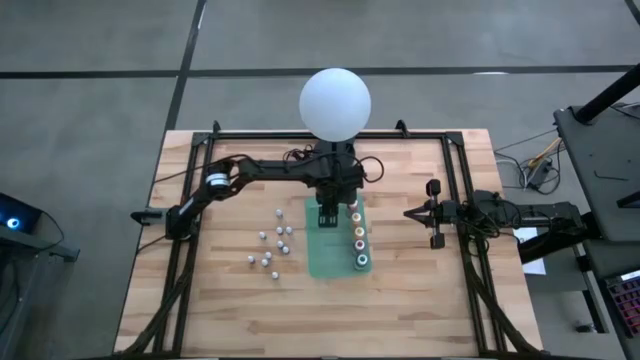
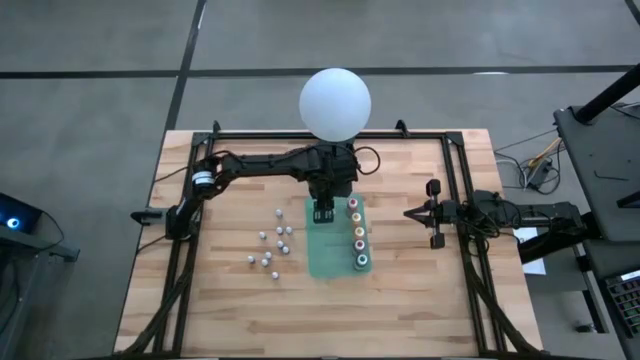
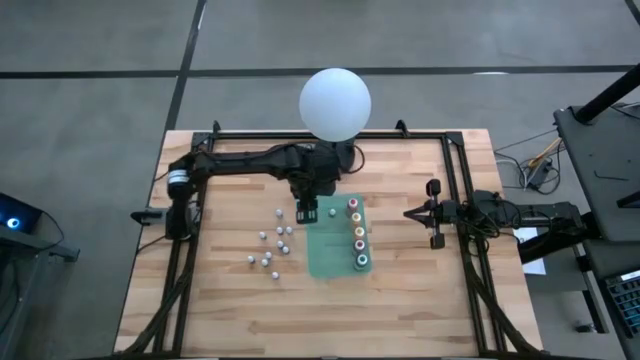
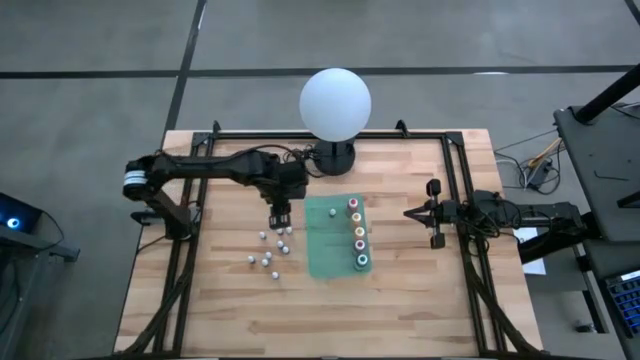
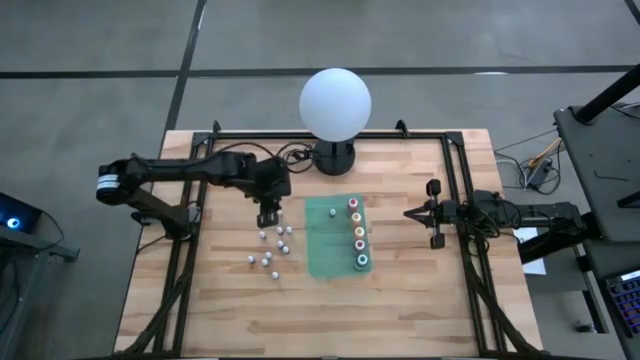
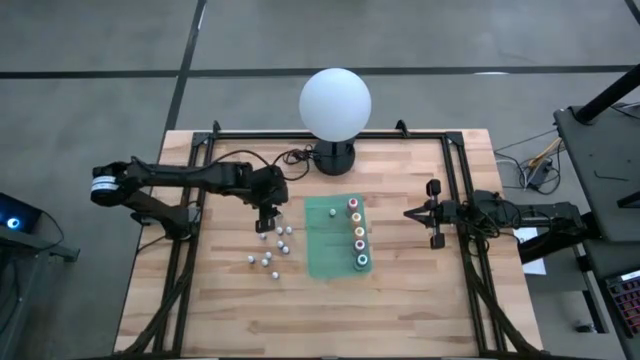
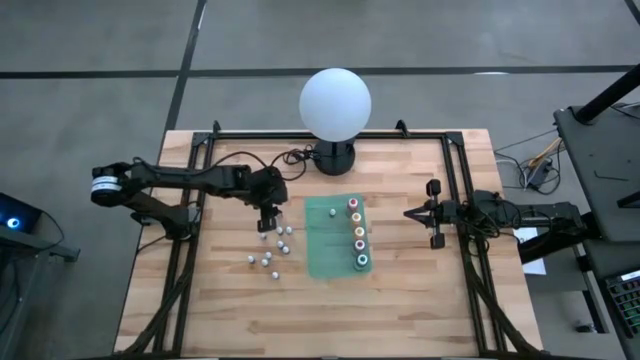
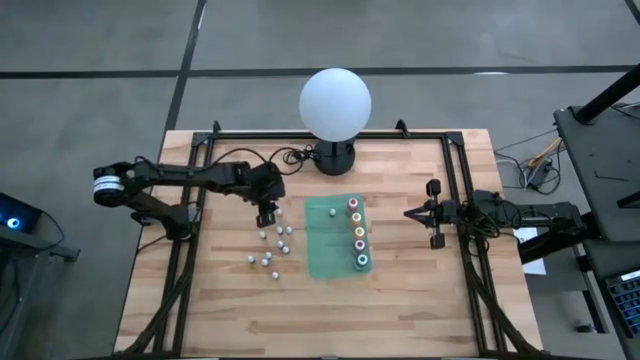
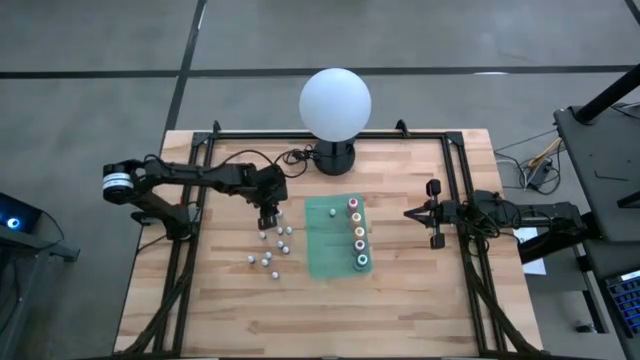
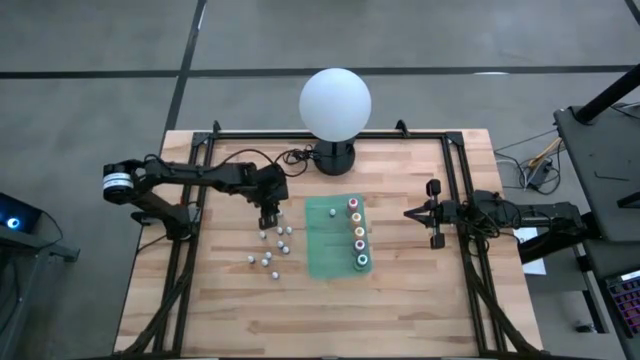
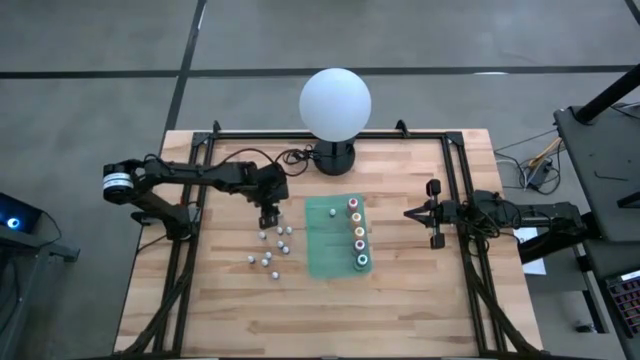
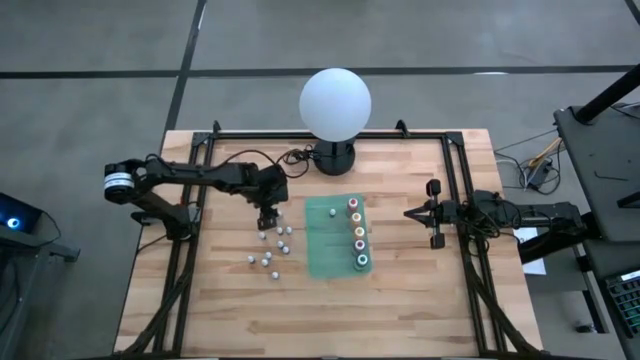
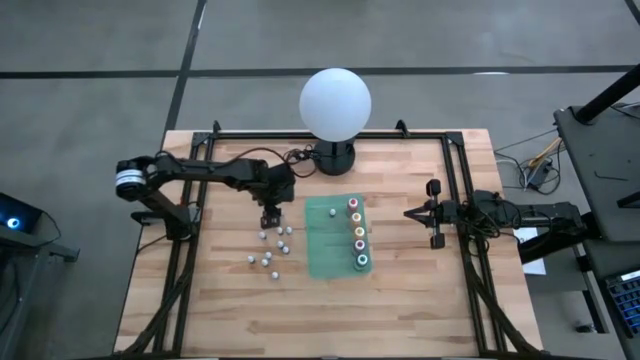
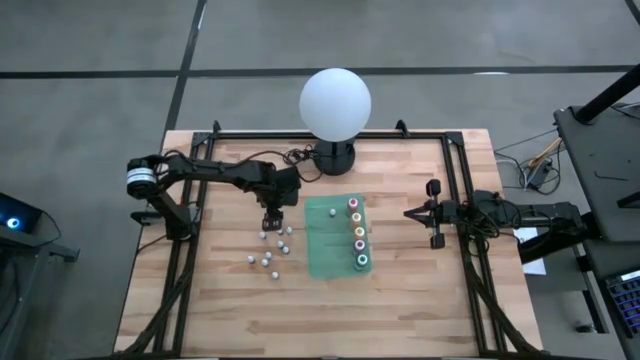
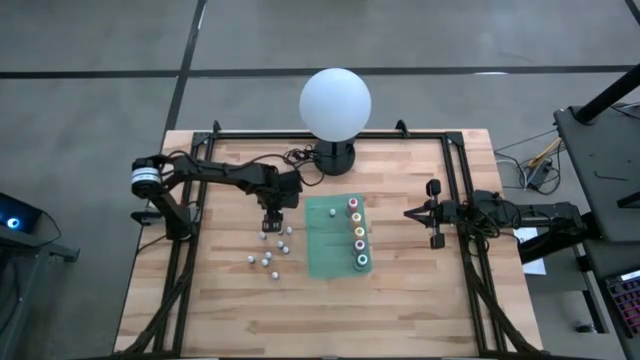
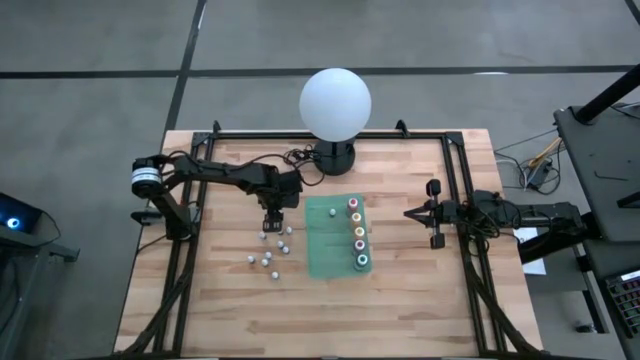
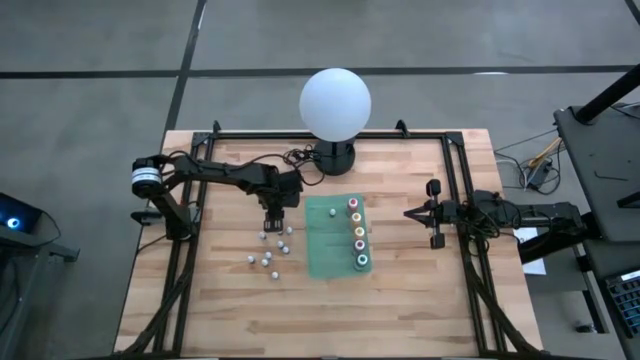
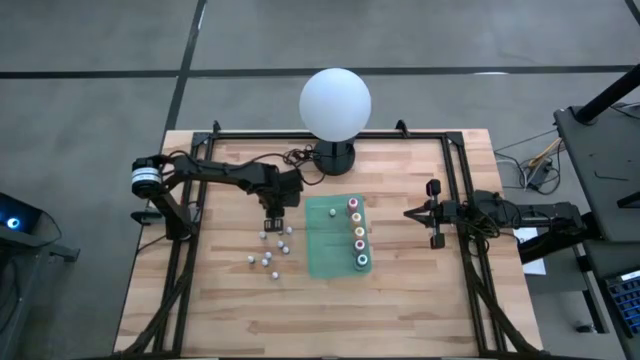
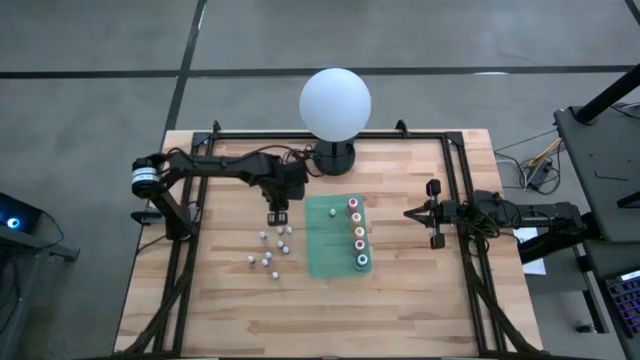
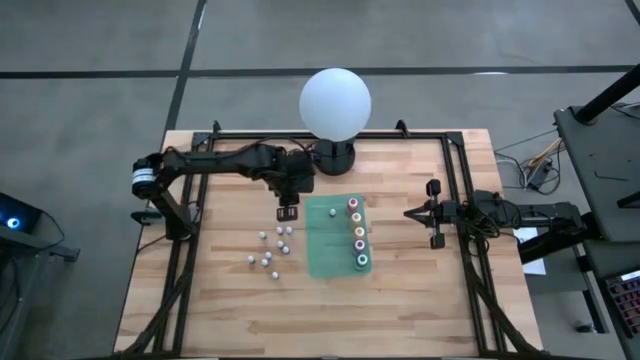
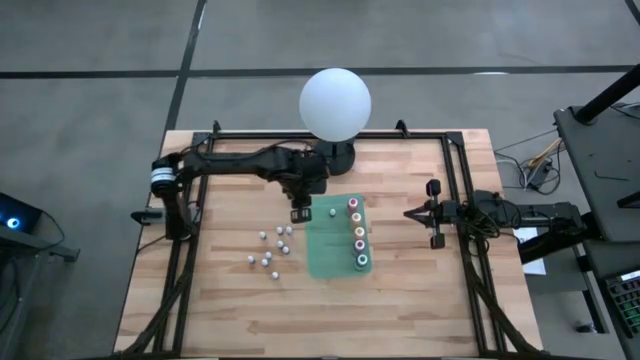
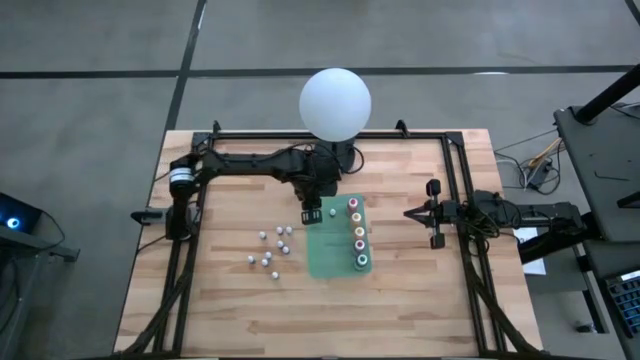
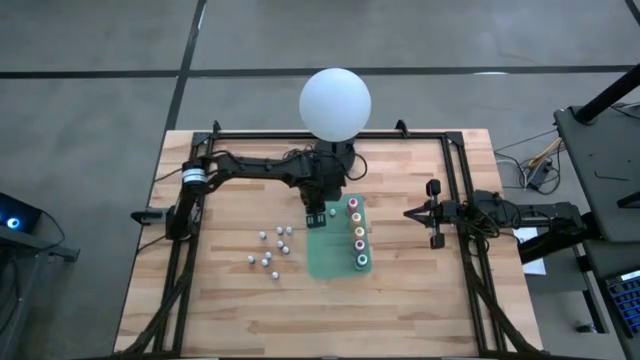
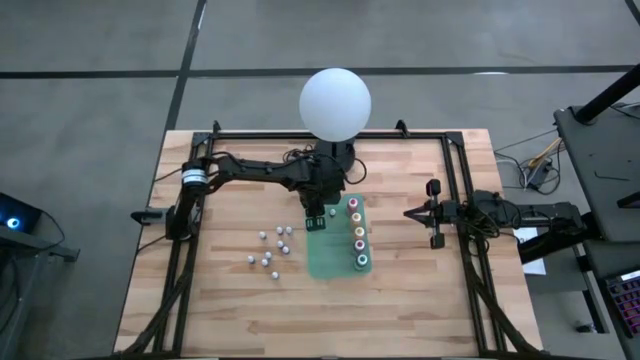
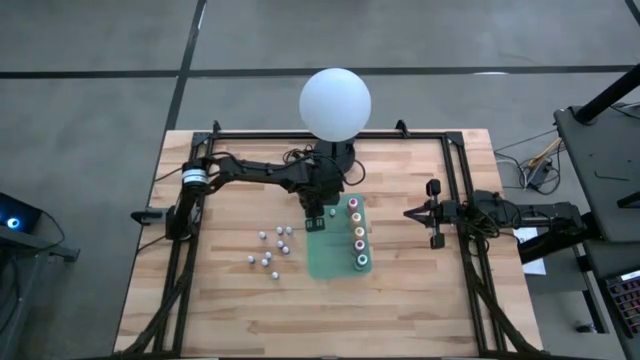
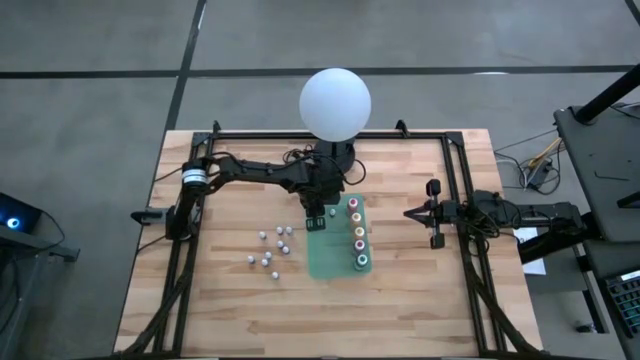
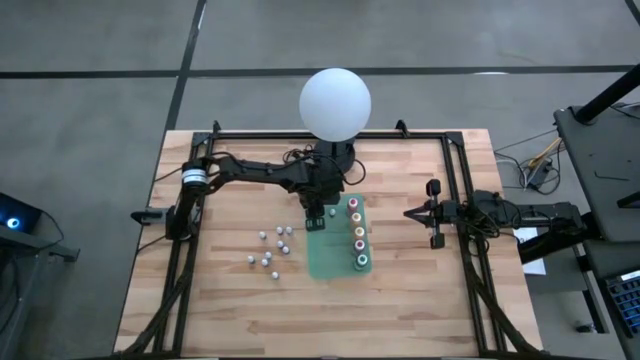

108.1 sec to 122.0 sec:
Task: Pick & Place food coloring
Put the top small red food coloring bottle into the green bin

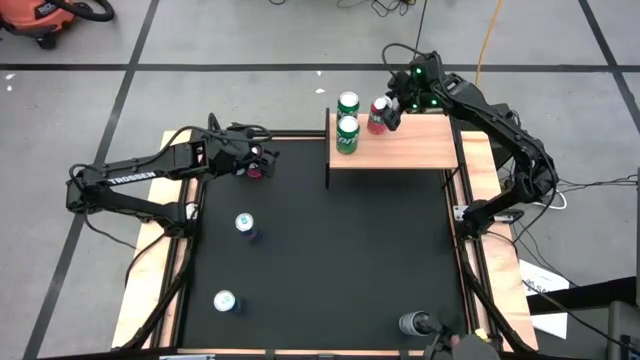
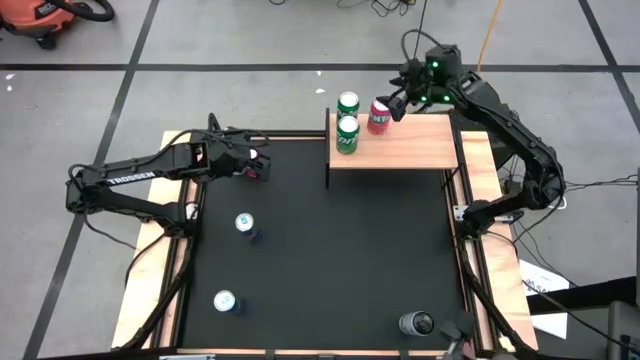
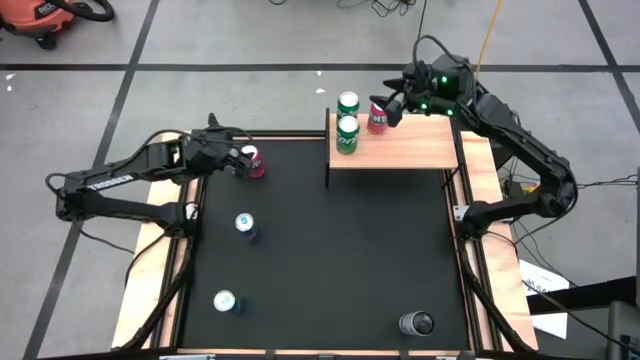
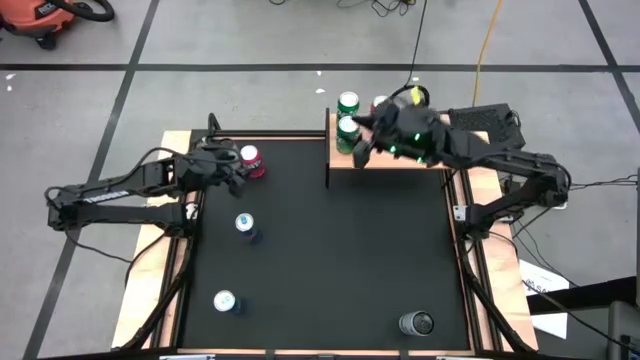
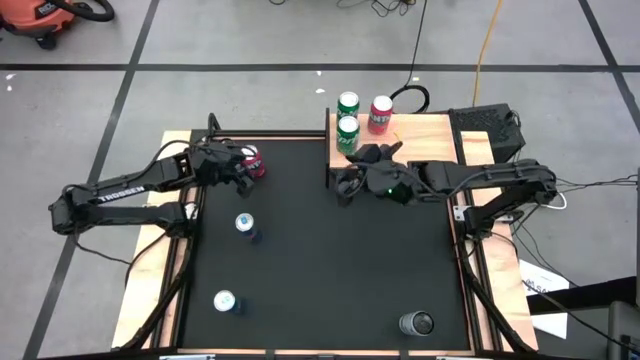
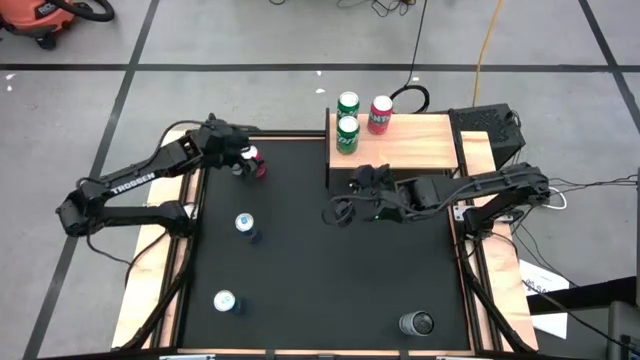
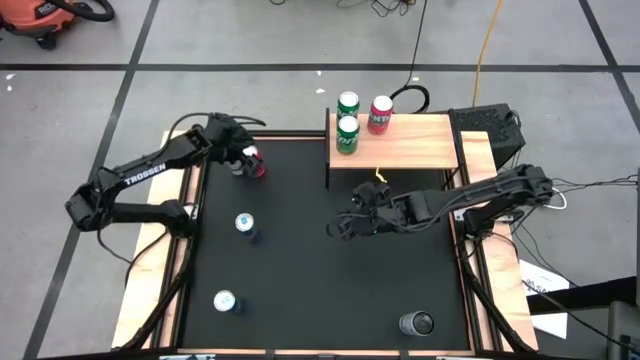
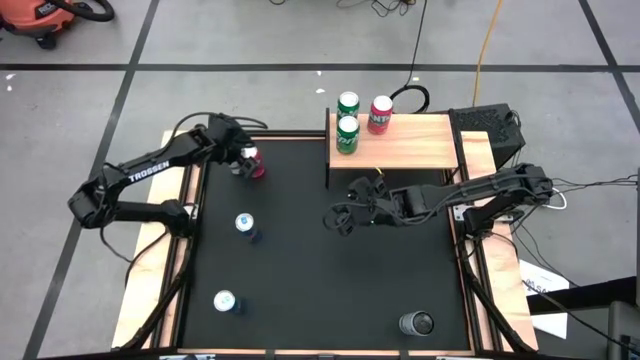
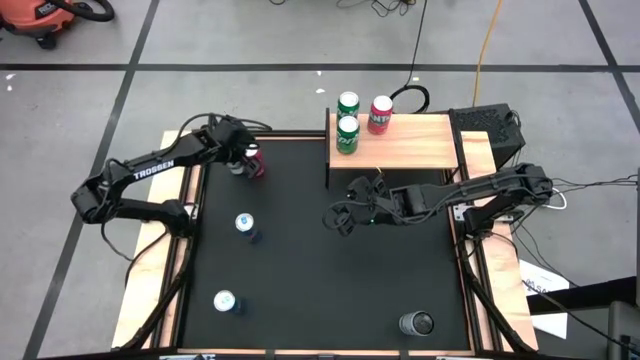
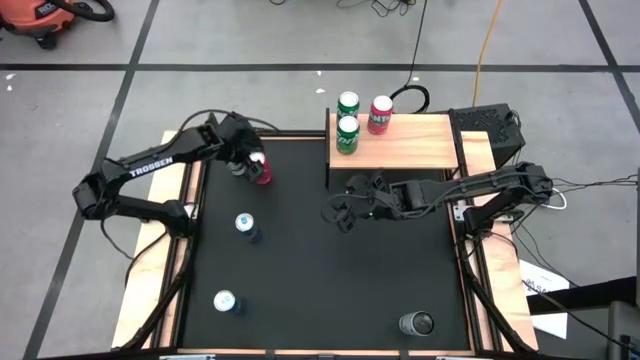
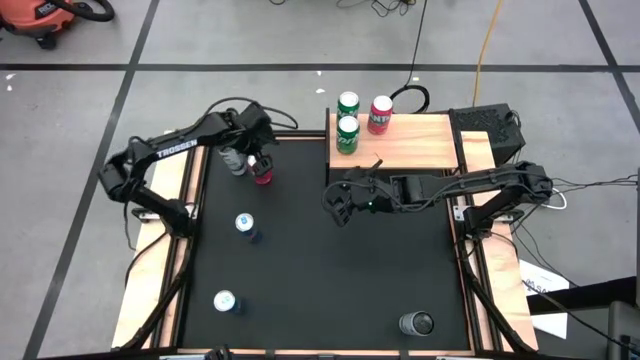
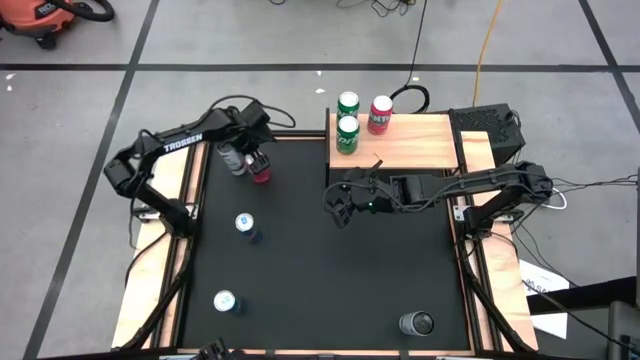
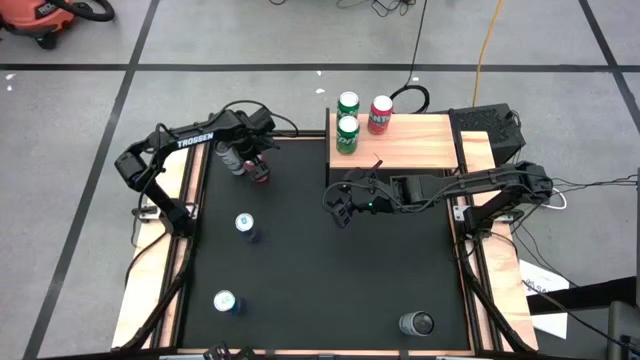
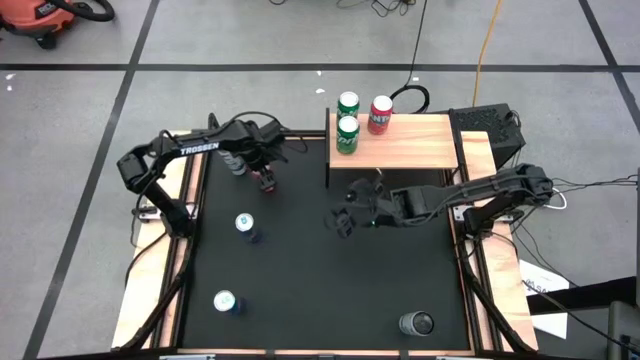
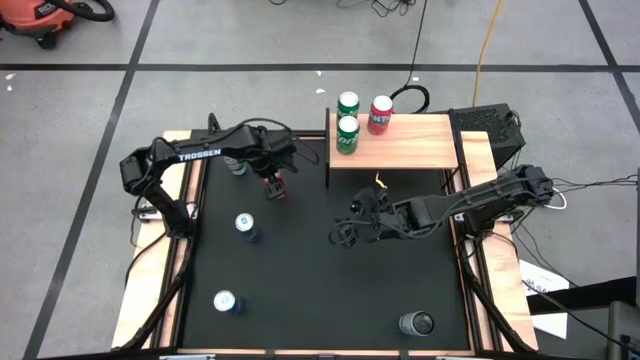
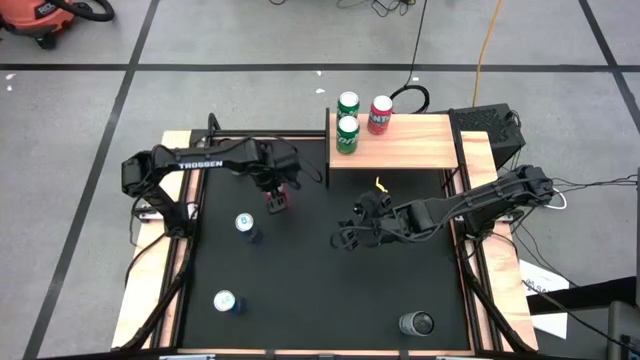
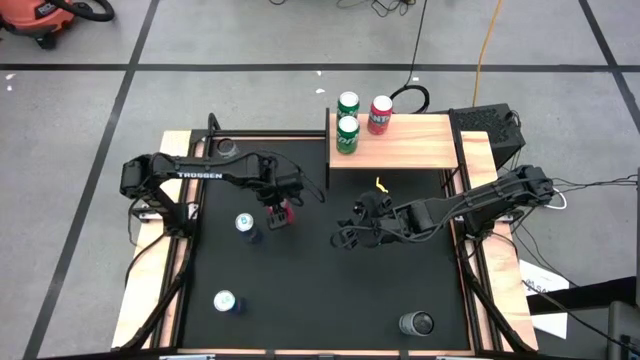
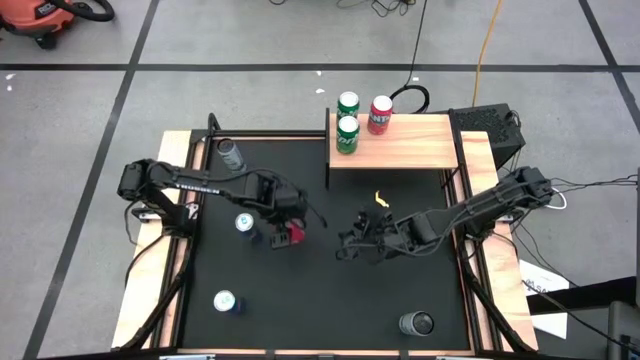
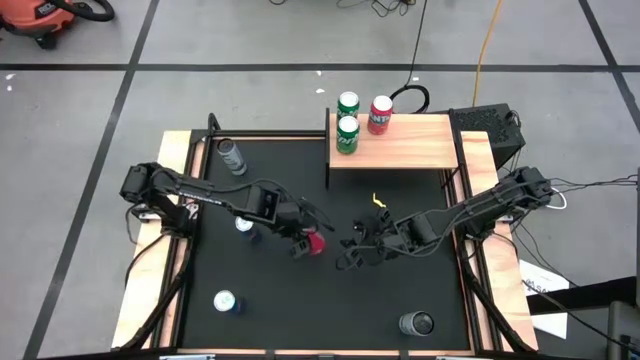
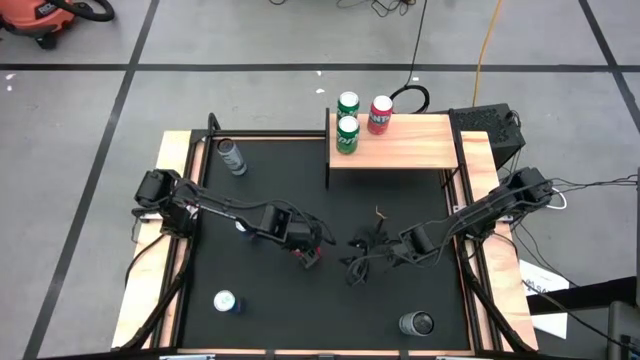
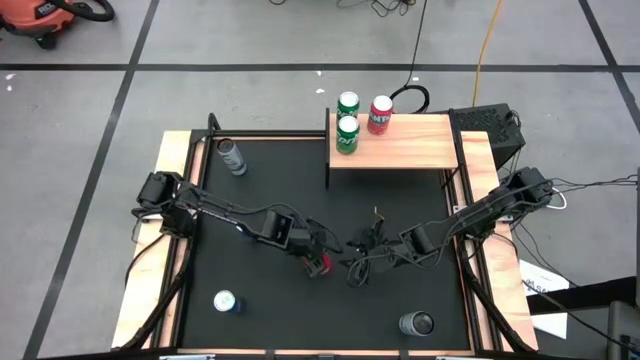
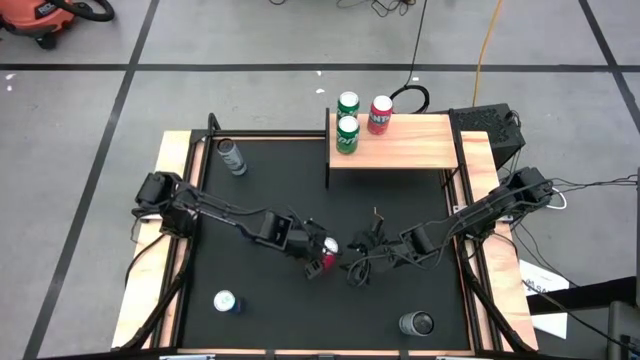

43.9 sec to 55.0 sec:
Task: Place canned beverage on shelf
Put the orange soda can on the shelf aligned with the other orange soda can
